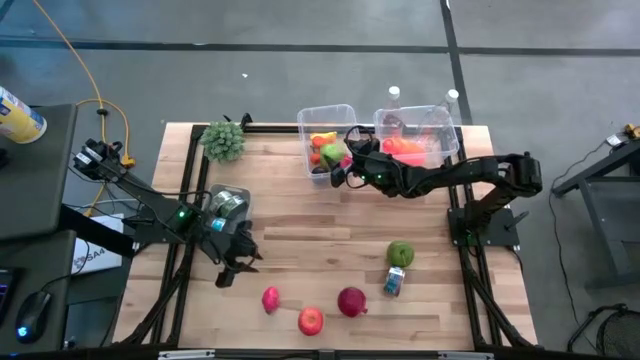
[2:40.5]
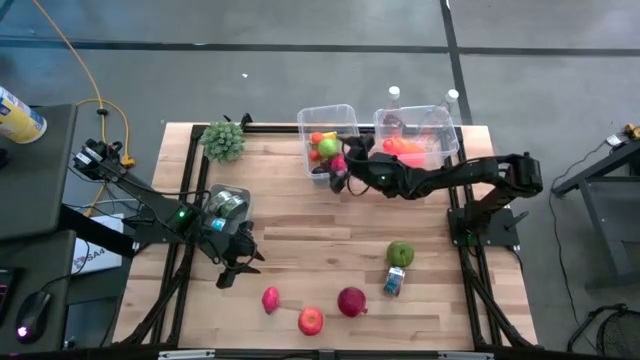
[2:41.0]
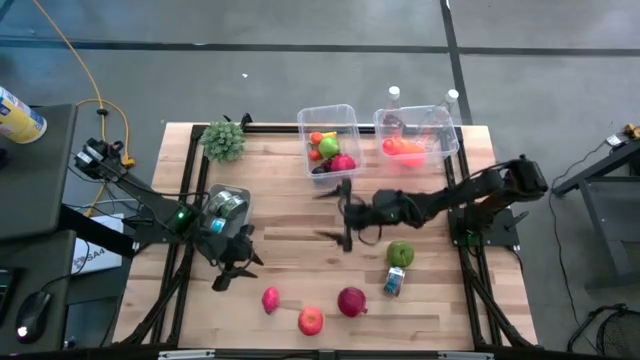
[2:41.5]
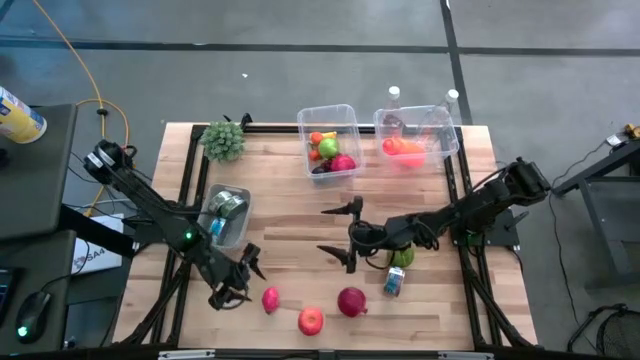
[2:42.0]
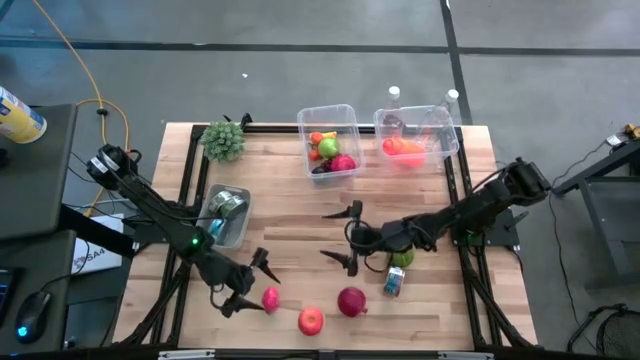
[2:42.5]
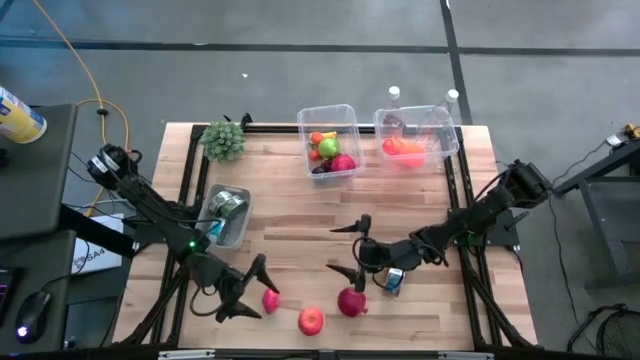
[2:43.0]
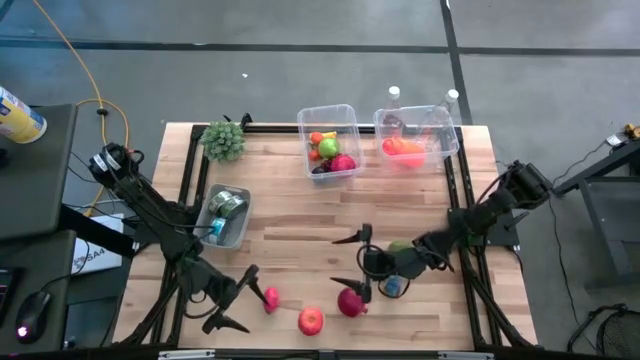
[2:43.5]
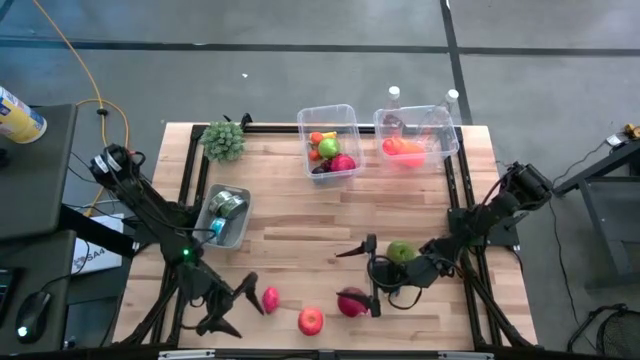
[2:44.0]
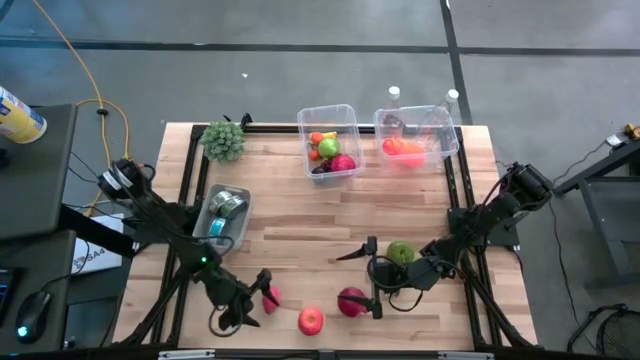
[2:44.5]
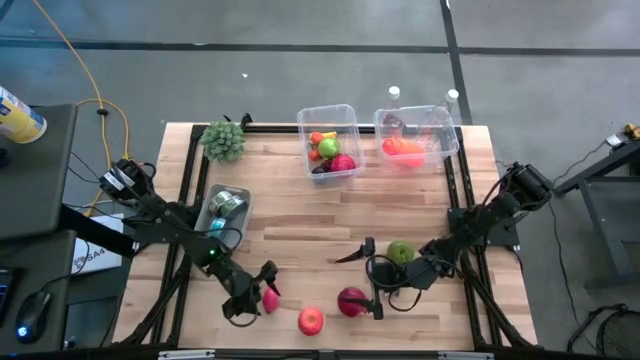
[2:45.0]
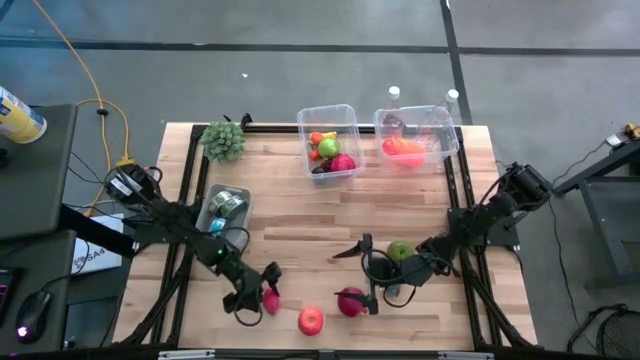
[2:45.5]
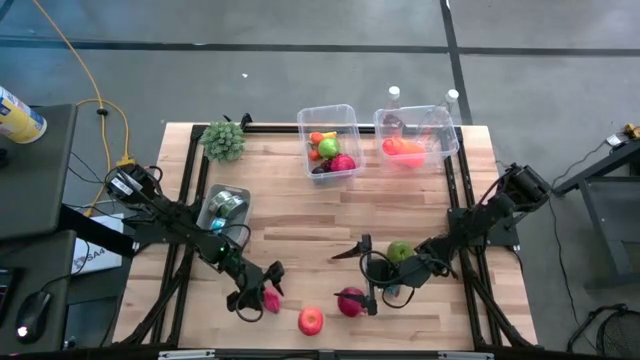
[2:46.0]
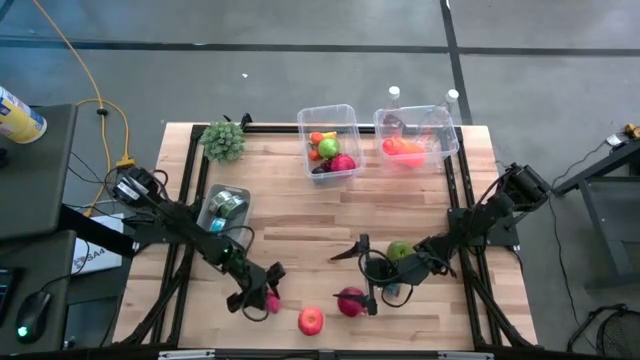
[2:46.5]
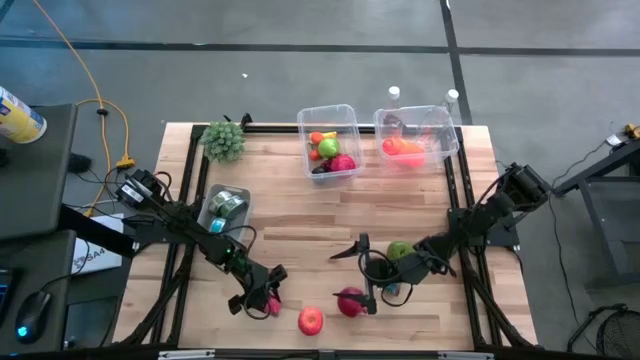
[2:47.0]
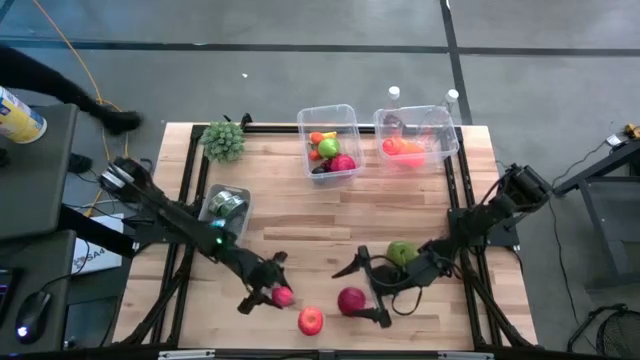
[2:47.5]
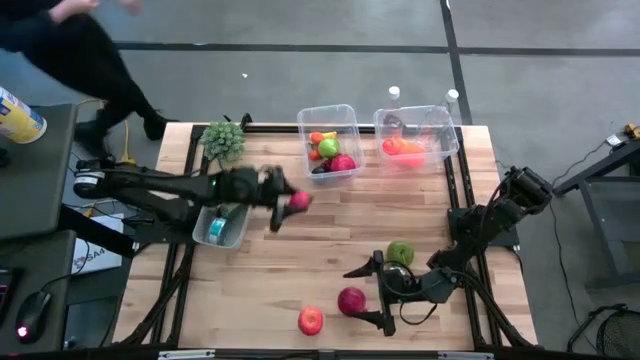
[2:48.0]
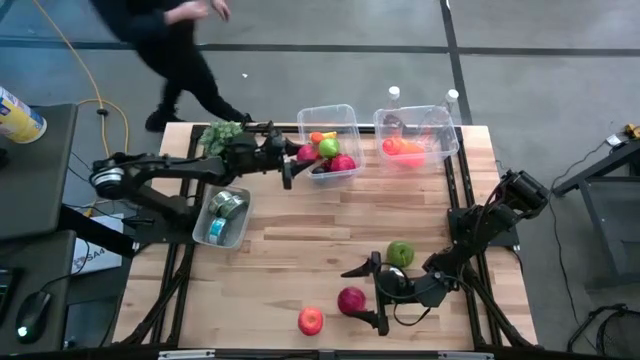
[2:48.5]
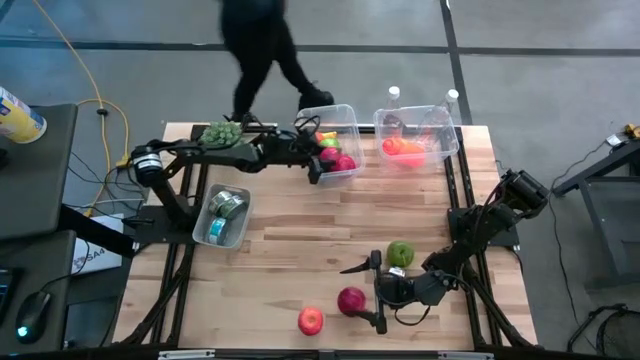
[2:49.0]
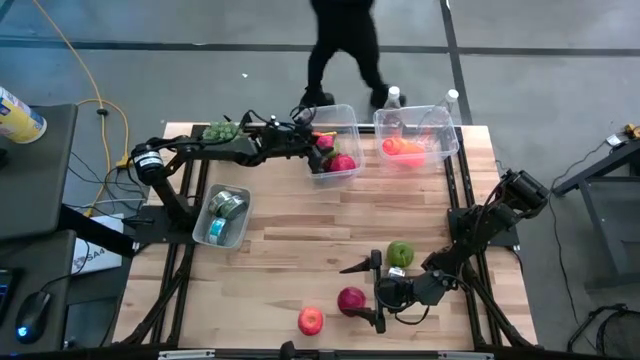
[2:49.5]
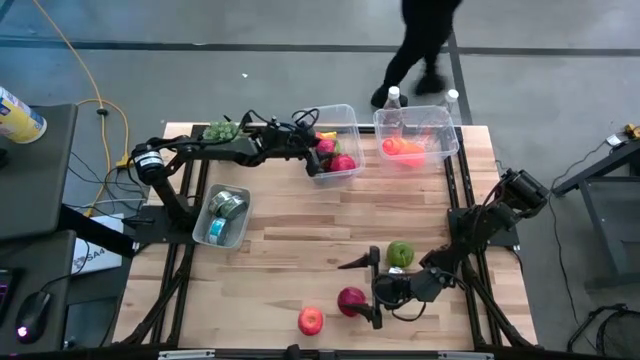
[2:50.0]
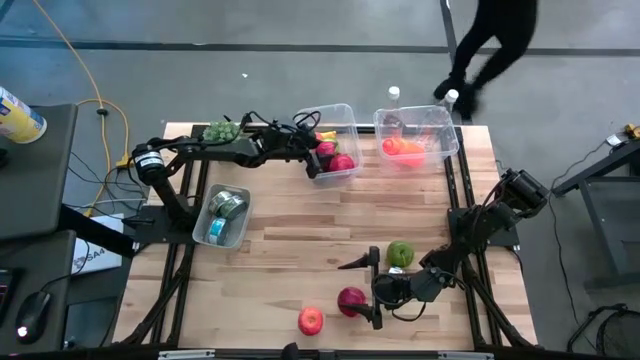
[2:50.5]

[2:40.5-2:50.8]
Task: Pick & Place Food Item
Put the dragon fruit into the left transparent bin

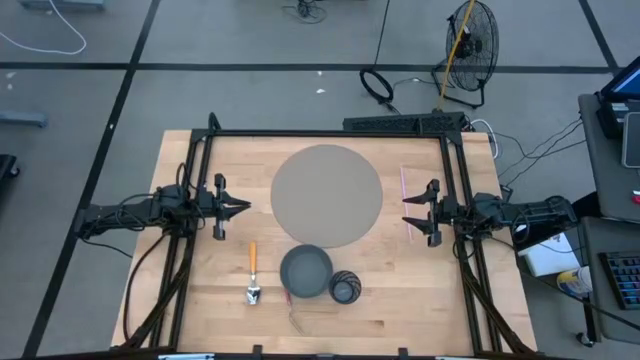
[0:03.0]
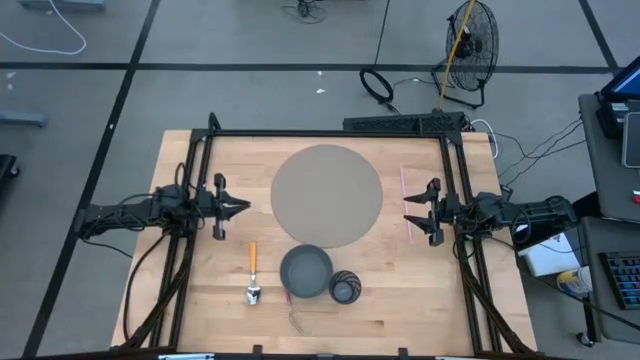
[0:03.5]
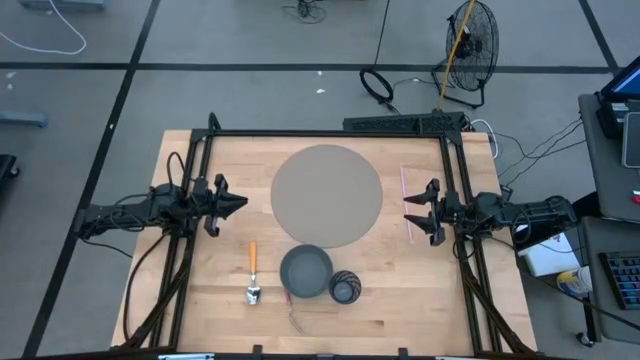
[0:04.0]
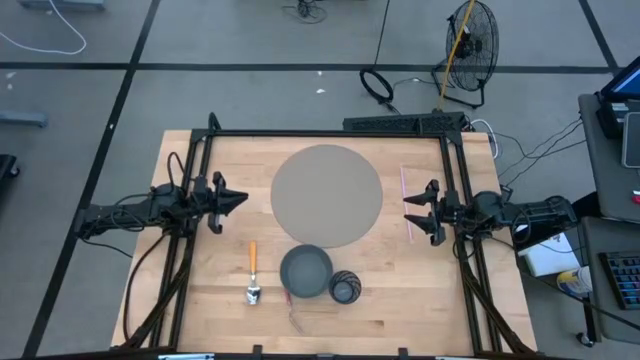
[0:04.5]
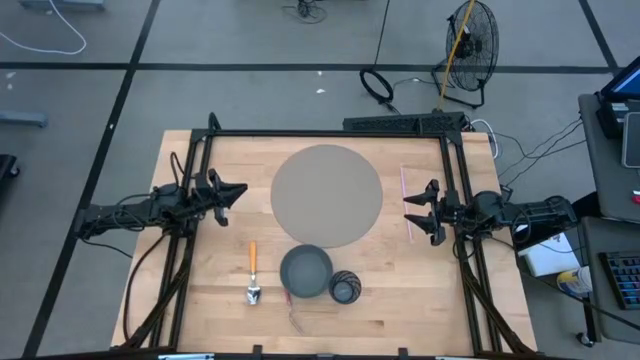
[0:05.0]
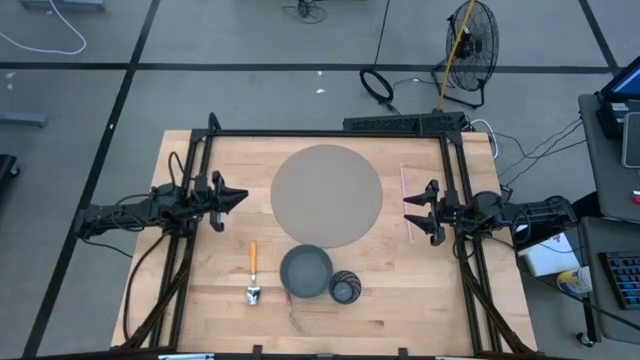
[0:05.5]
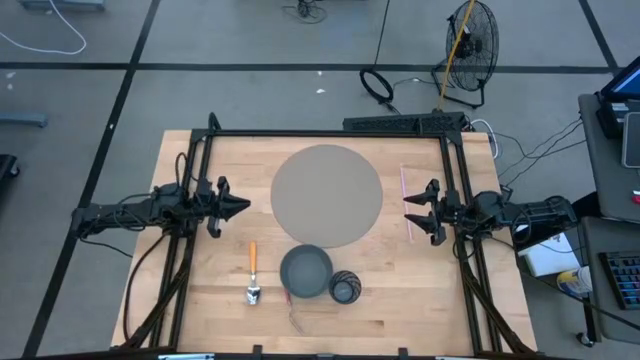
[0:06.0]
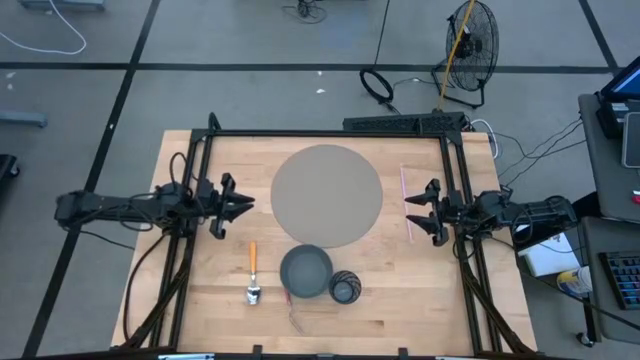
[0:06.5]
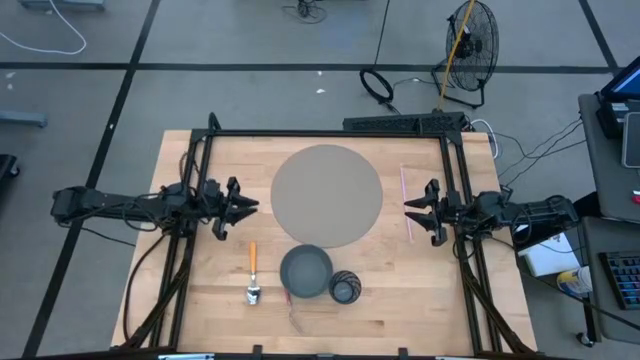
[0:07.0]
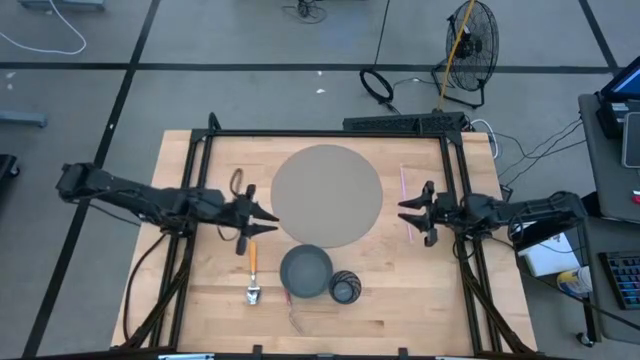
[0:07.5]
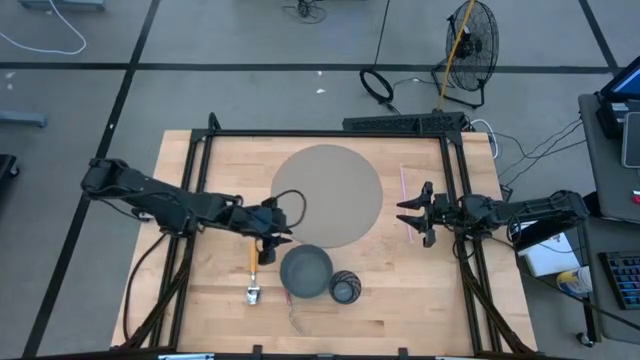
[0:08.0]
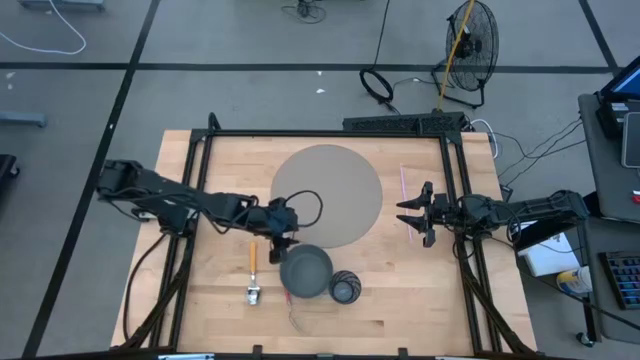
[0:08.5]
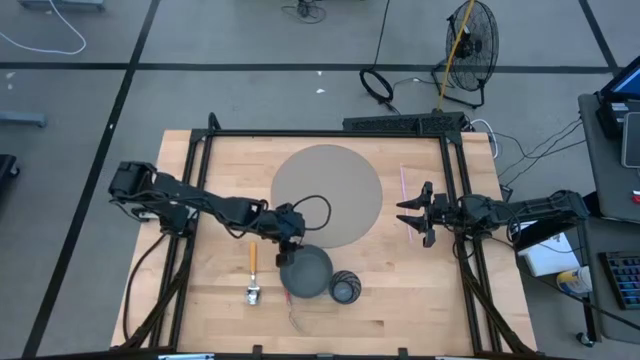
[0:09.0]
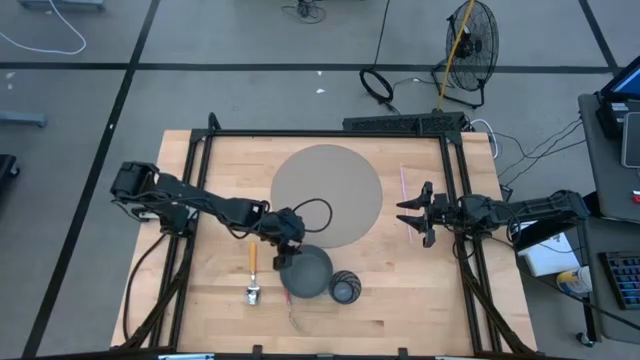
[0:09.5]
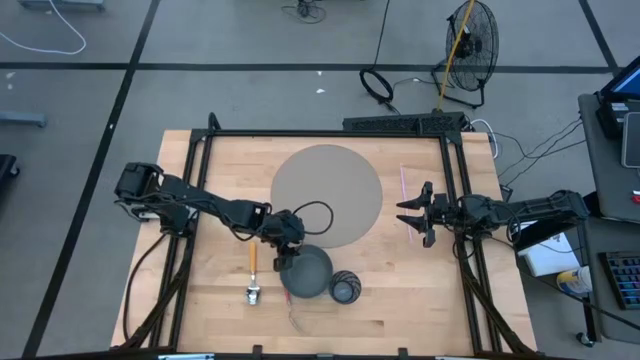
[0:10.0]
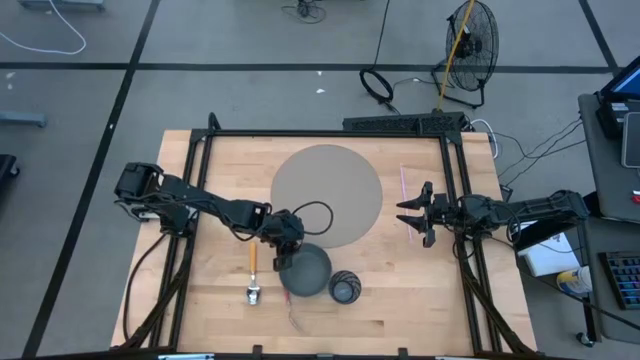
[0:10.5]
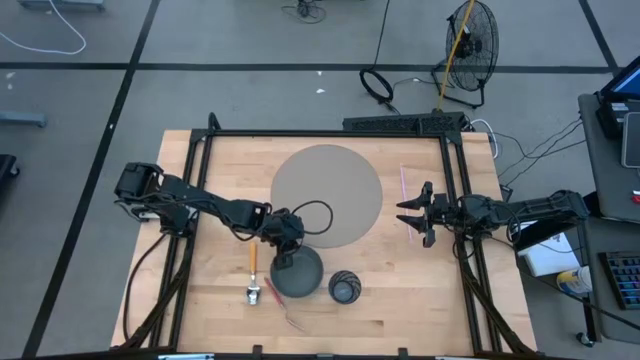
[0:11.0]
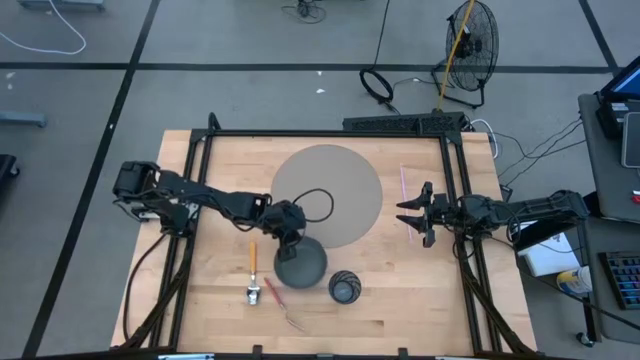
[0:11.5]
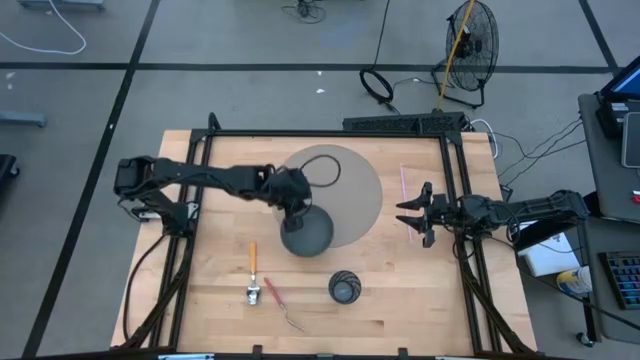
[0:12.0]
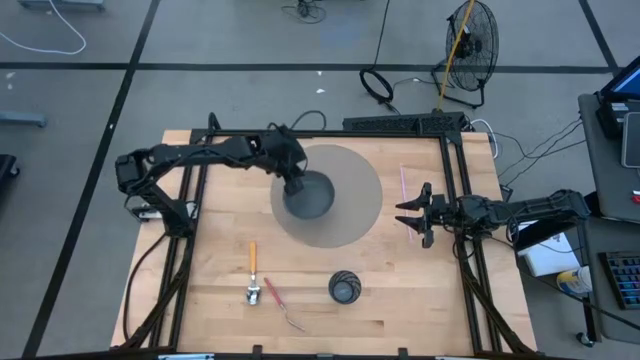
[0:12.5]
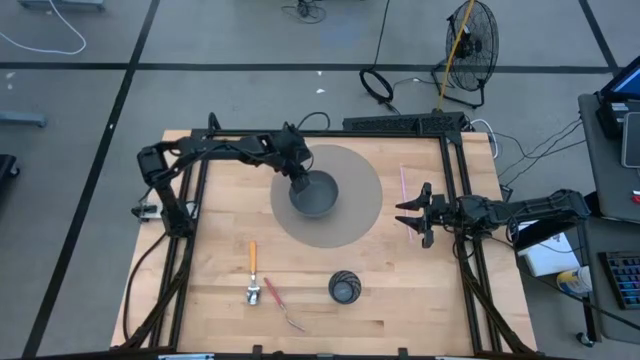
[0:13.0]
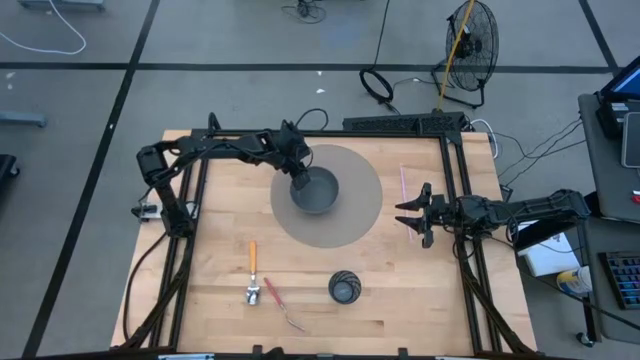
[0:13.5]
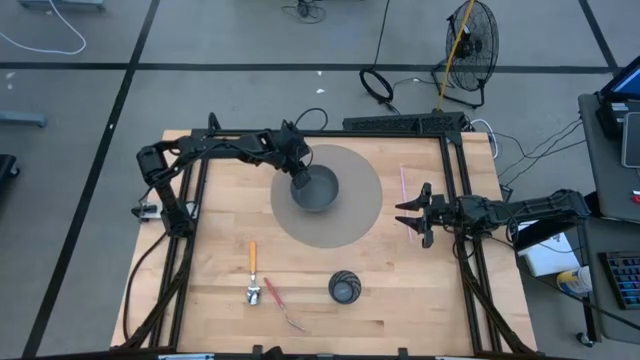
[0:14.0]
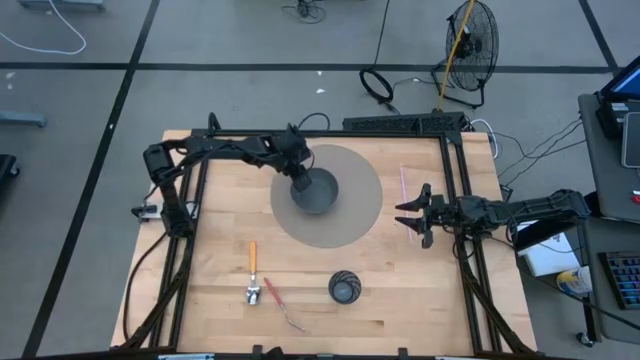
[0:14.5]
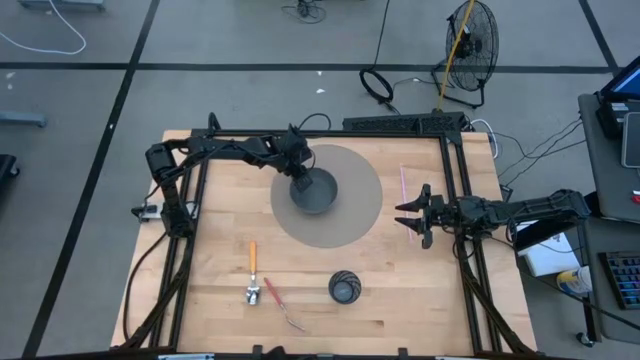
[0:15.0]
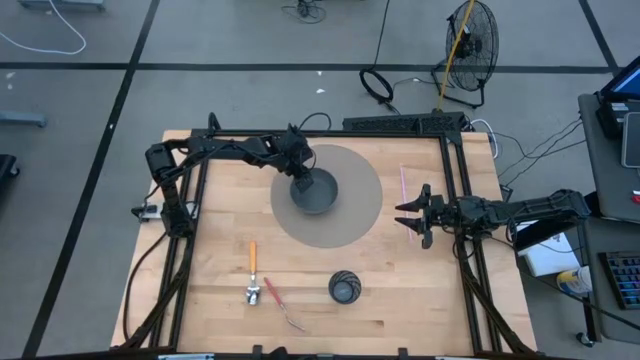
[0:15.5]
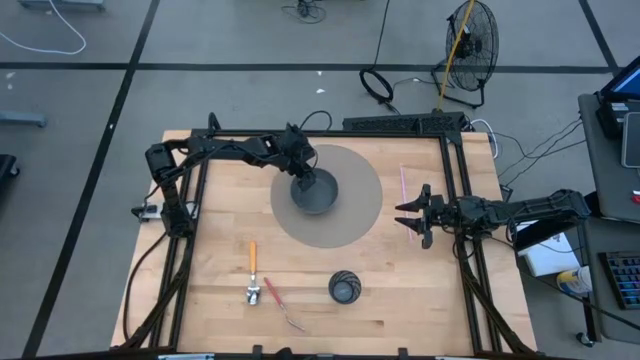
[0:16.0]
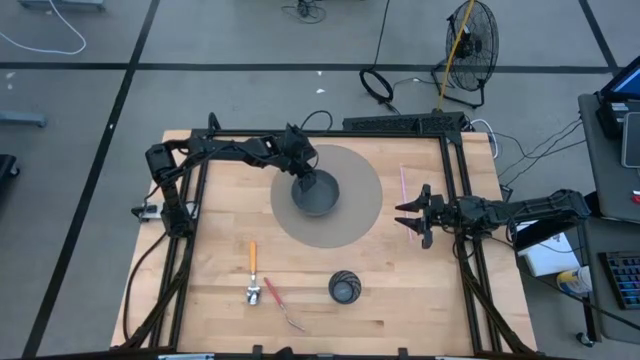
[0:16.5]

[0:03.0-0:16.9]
Task: Pick & Place Utensil
Put the dark blue bowl on the center gray placemat
